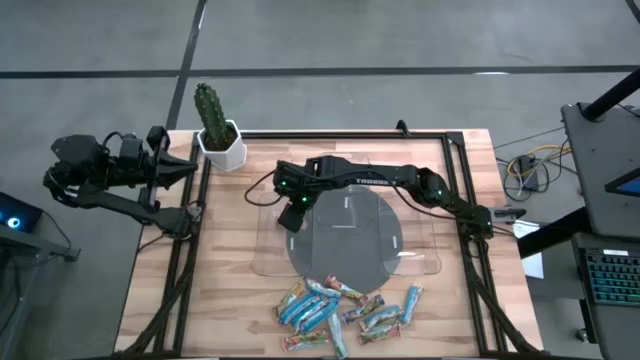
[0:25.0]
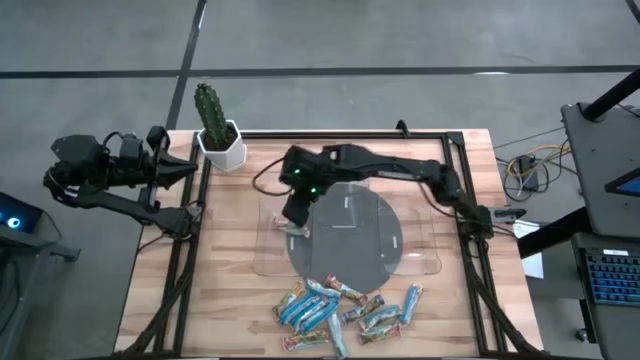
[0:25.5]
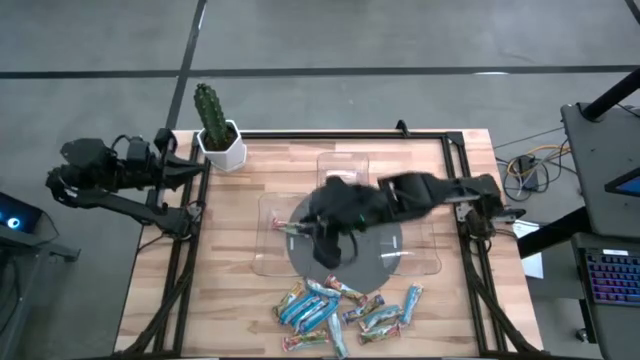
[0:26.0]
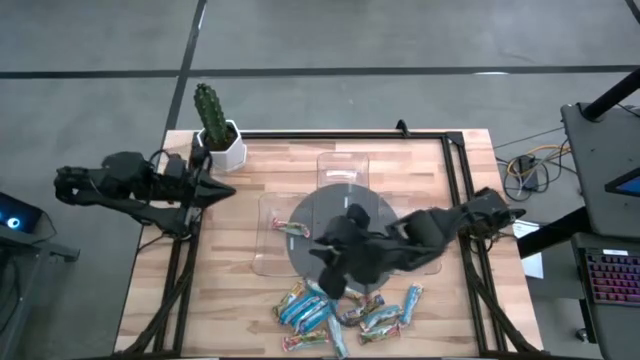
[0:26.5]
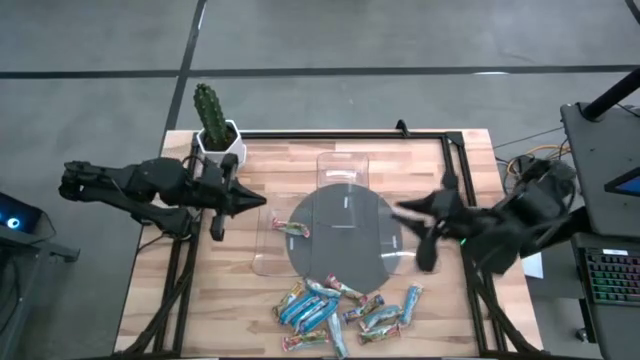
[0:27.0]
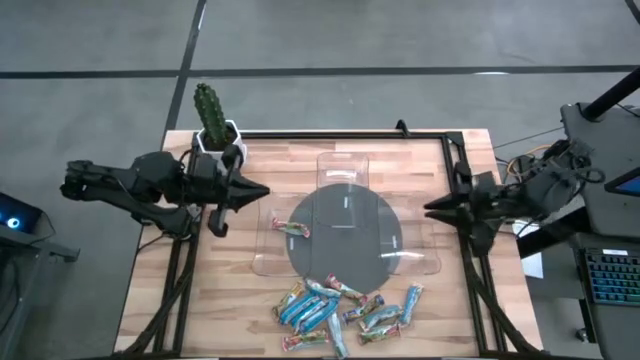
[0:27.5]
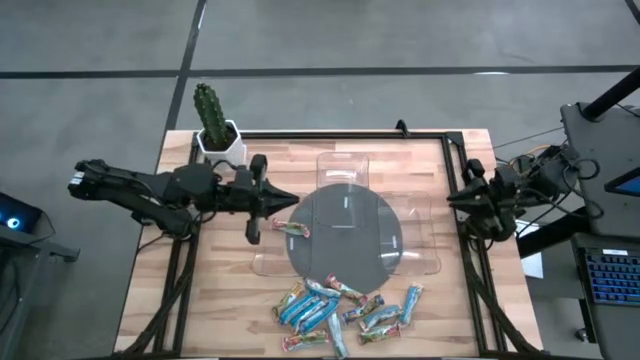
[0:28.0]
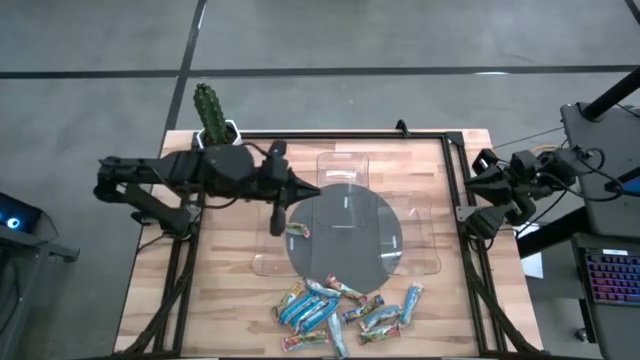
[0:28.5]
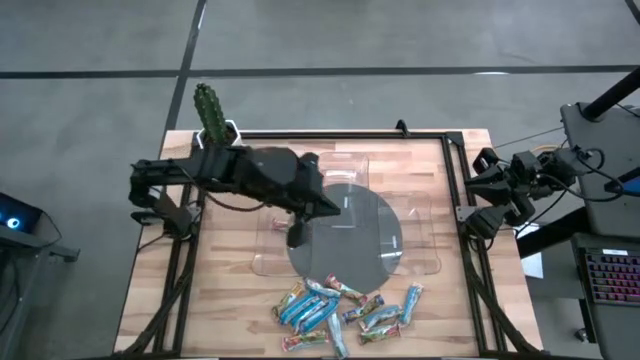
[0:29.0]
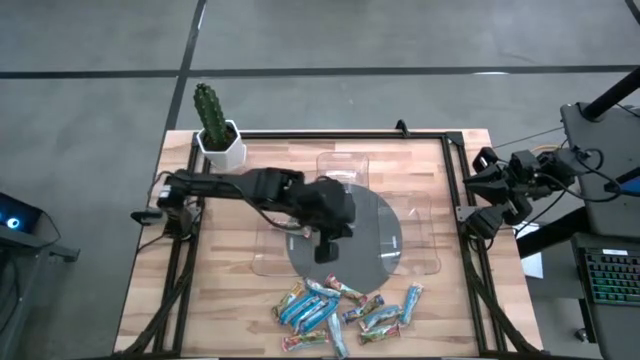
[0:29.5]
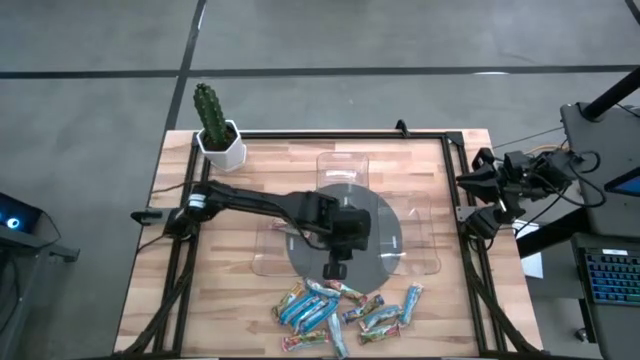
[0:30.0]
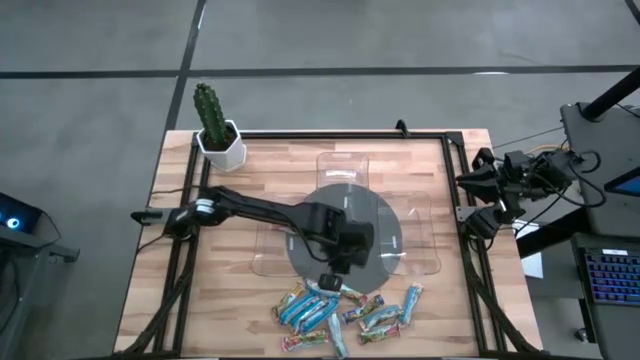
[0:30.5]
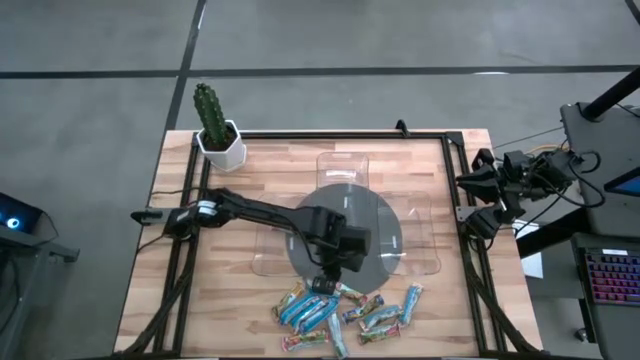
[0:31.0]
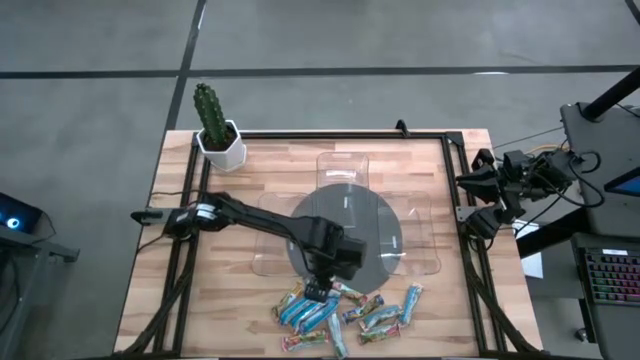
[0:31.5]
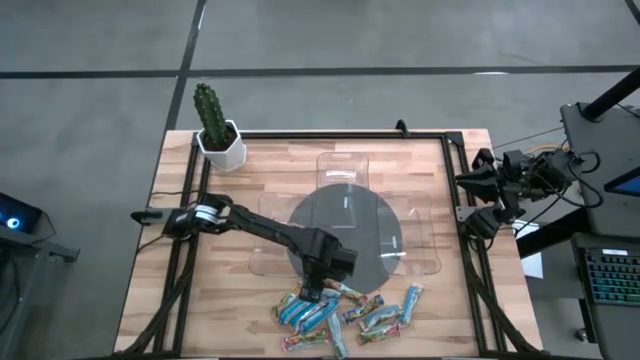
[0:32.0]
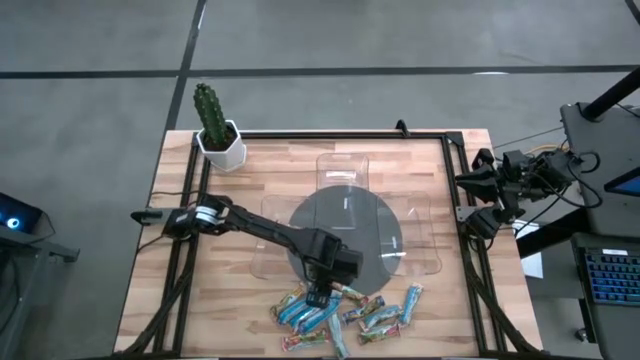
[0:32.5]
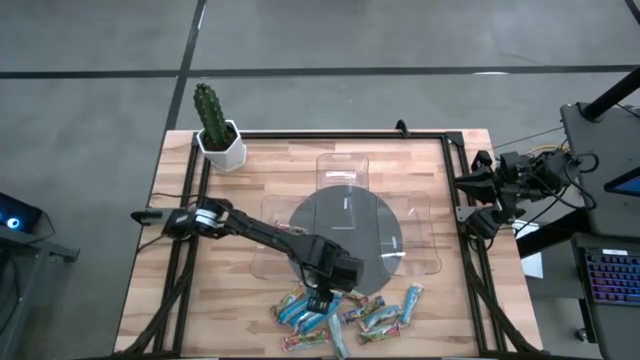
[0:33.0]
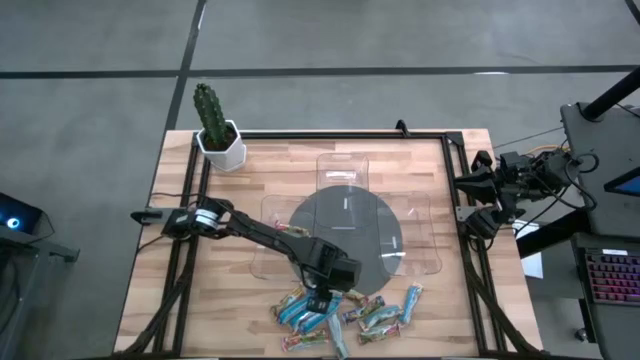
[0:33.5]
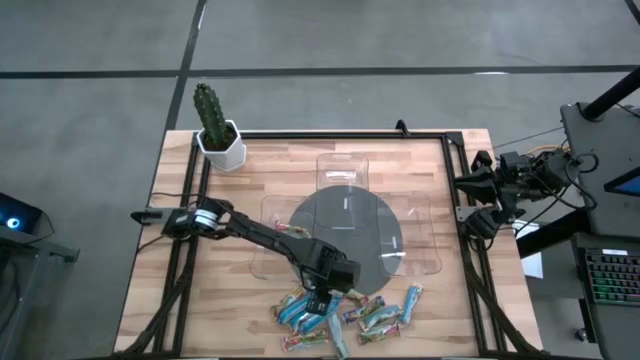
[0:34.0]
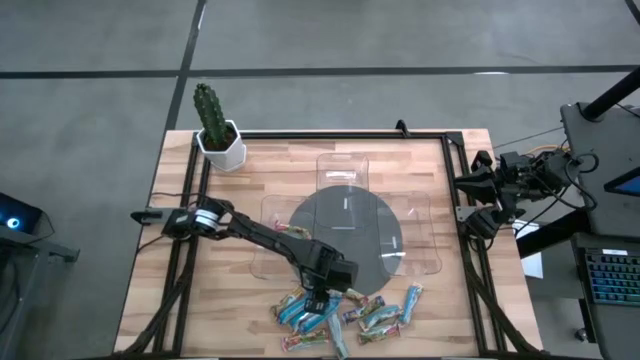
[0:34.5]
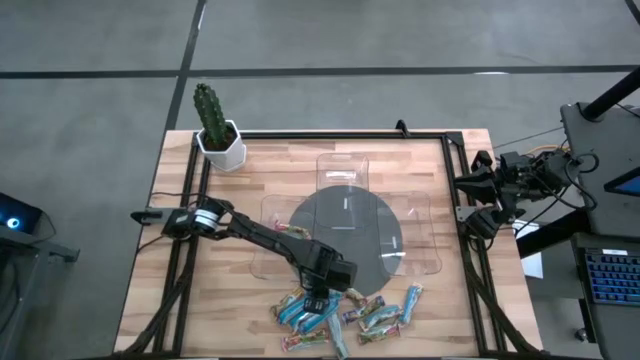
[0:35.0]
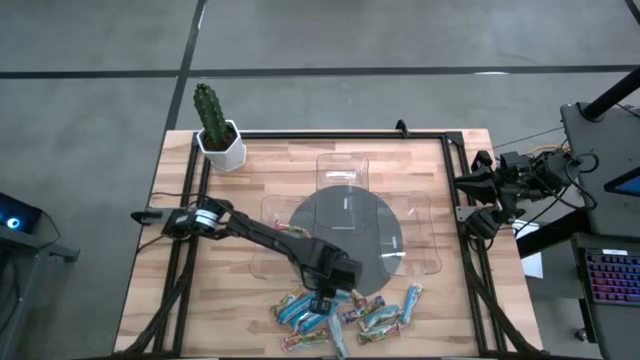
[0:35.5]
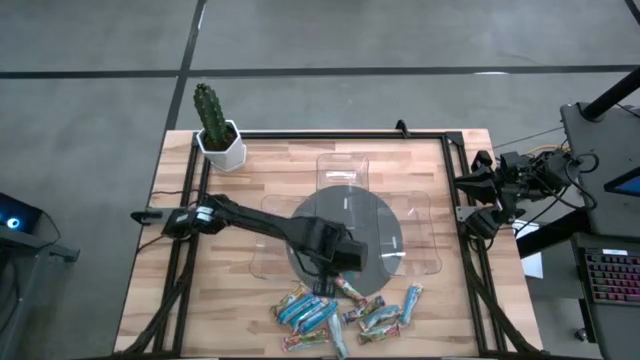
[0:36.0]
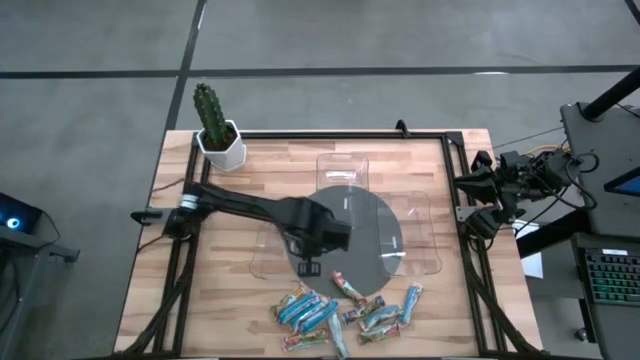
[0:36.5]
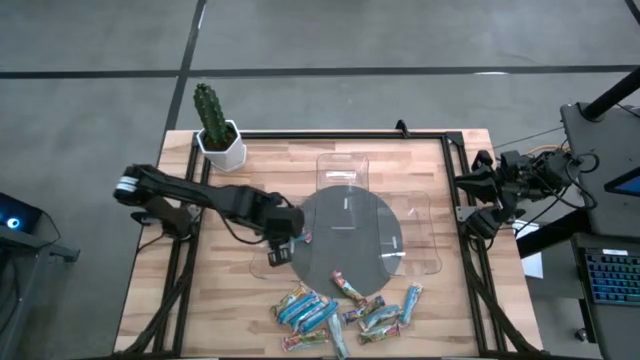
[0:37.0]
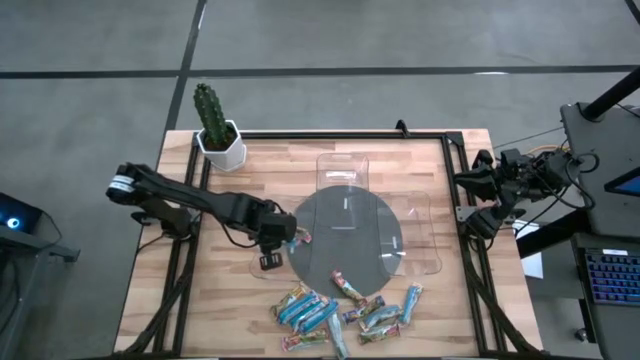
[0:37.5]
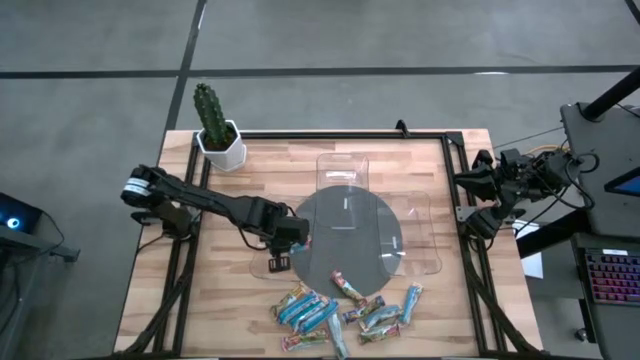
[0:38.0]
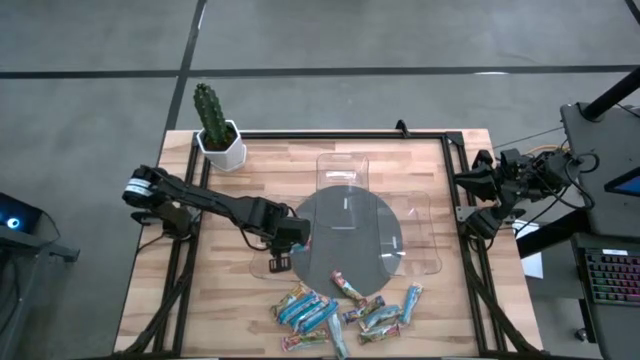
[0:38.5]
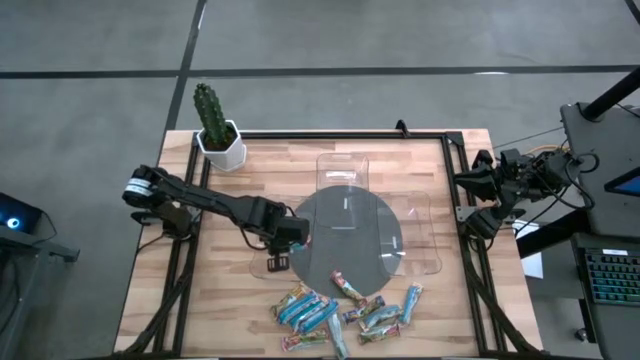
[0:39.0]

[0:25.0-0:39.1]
Task: Pick and place Granola Bars by type
Put the red granola bar into the left transparent bin
